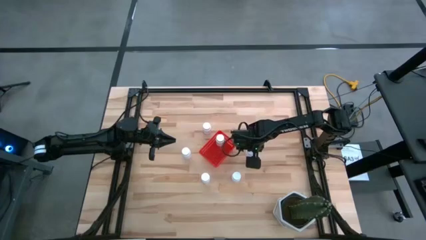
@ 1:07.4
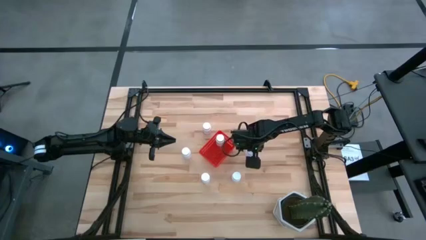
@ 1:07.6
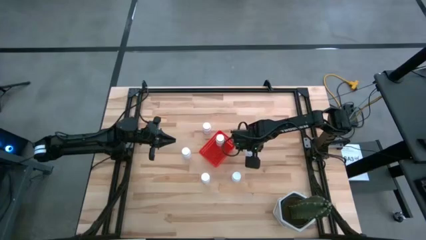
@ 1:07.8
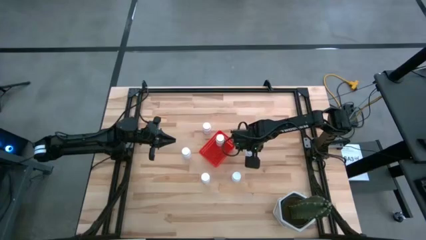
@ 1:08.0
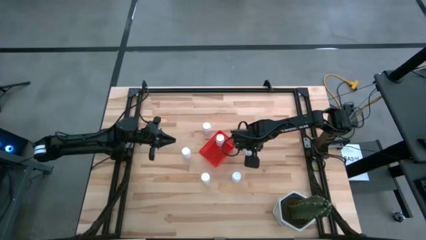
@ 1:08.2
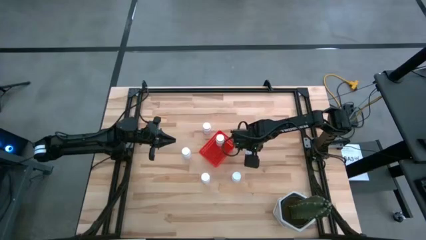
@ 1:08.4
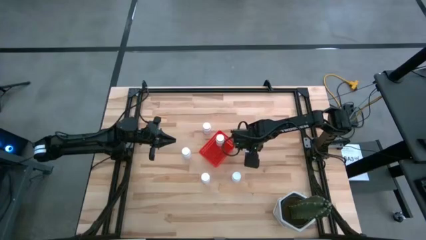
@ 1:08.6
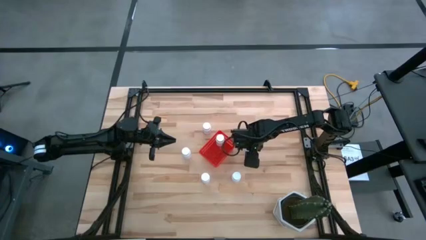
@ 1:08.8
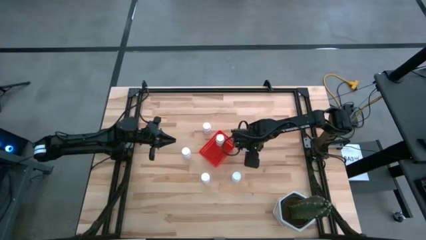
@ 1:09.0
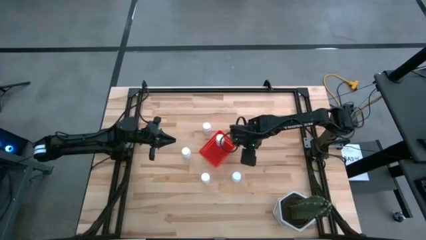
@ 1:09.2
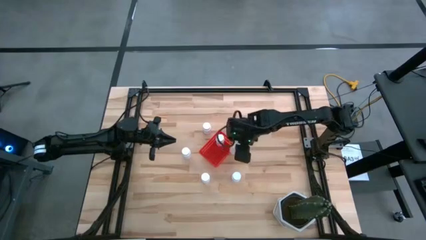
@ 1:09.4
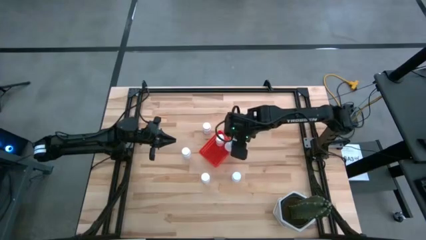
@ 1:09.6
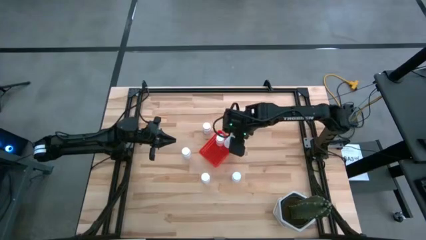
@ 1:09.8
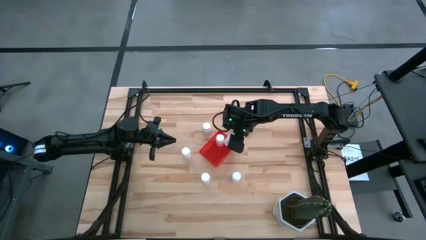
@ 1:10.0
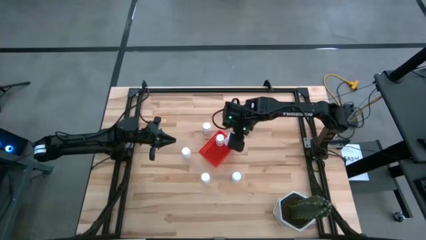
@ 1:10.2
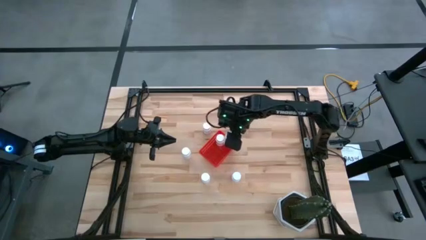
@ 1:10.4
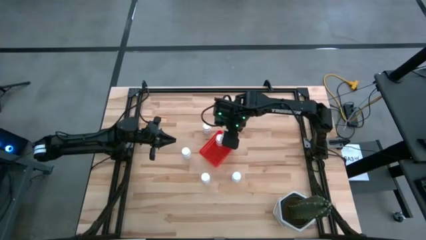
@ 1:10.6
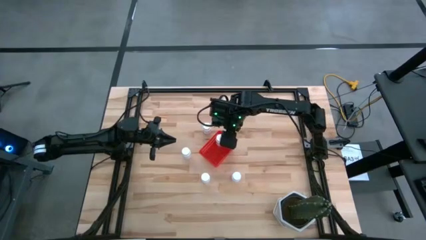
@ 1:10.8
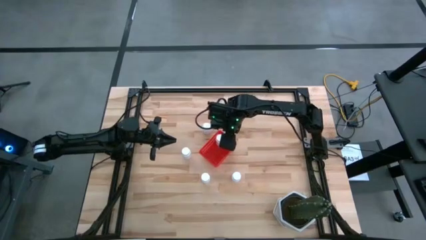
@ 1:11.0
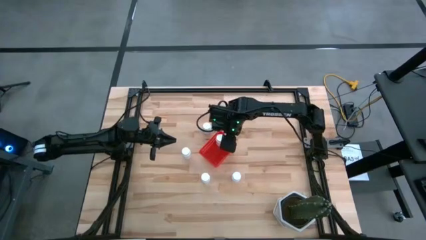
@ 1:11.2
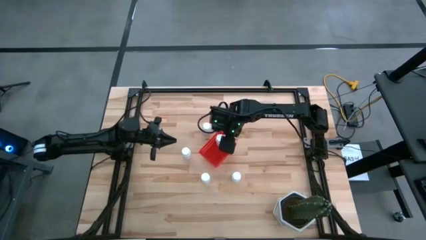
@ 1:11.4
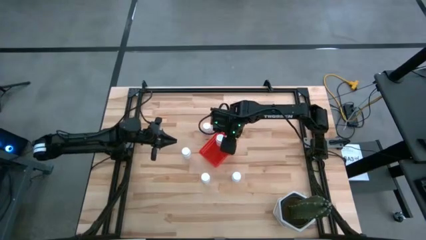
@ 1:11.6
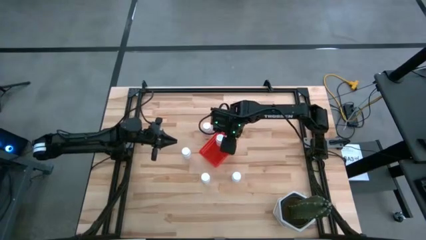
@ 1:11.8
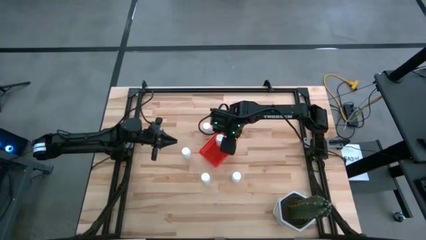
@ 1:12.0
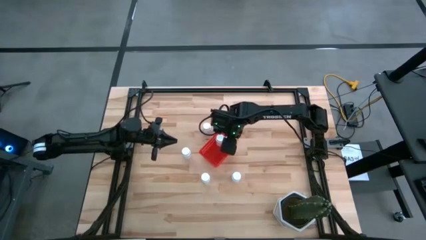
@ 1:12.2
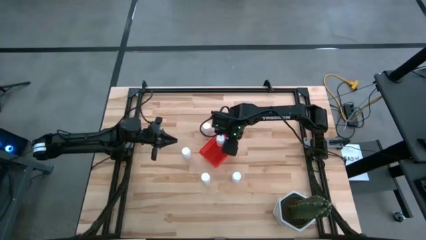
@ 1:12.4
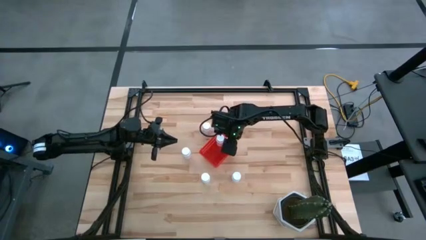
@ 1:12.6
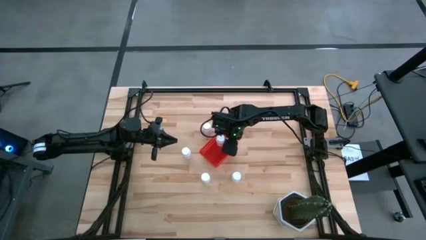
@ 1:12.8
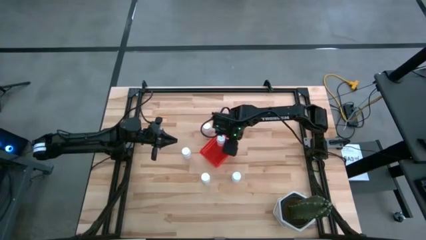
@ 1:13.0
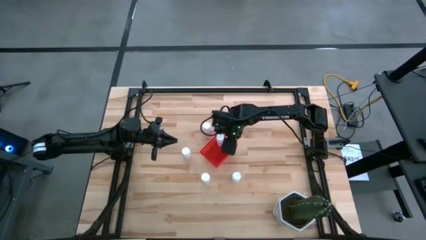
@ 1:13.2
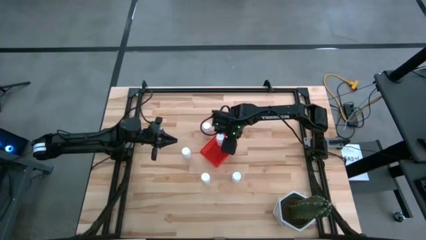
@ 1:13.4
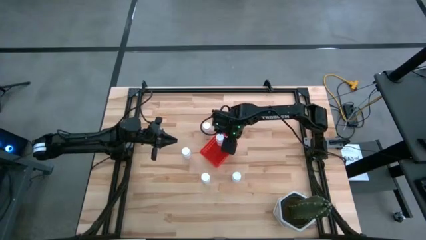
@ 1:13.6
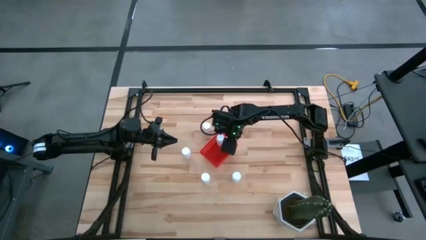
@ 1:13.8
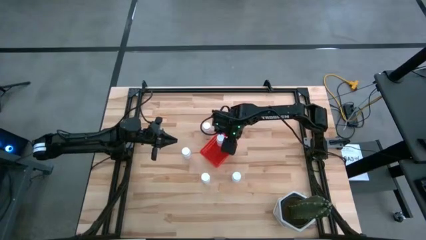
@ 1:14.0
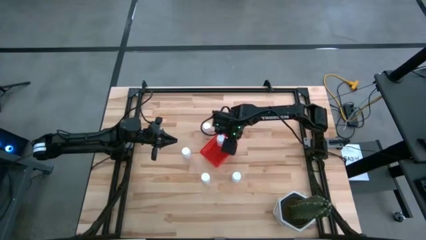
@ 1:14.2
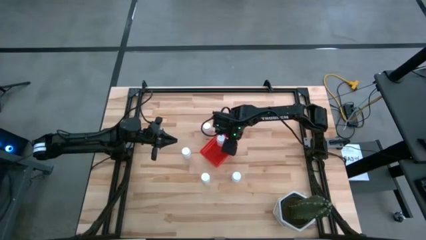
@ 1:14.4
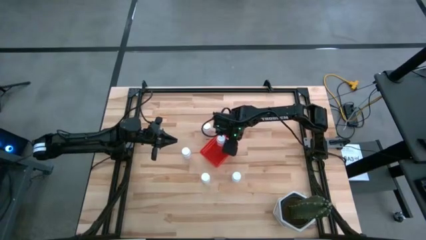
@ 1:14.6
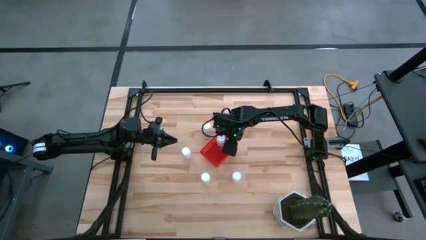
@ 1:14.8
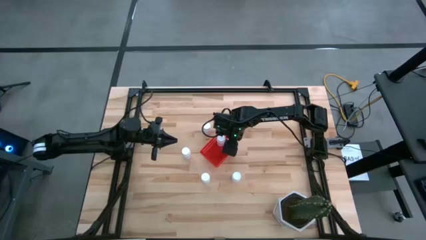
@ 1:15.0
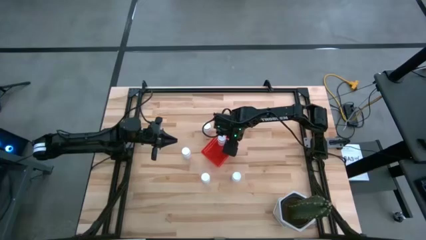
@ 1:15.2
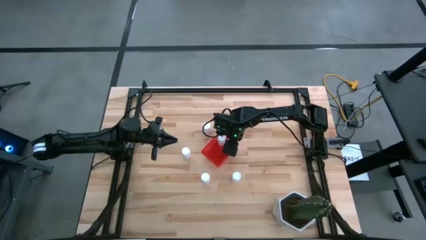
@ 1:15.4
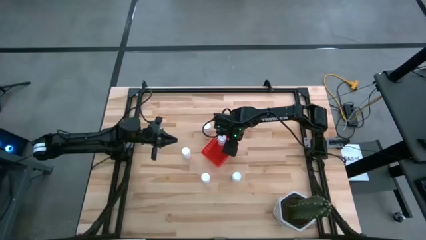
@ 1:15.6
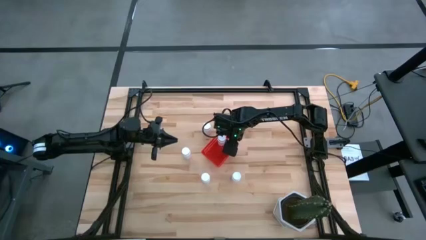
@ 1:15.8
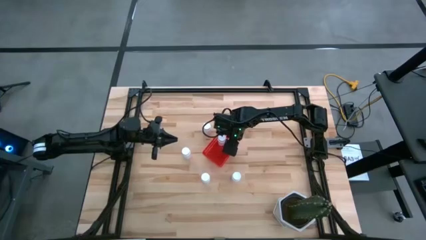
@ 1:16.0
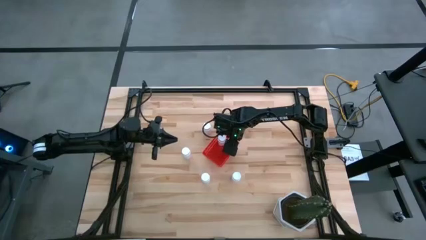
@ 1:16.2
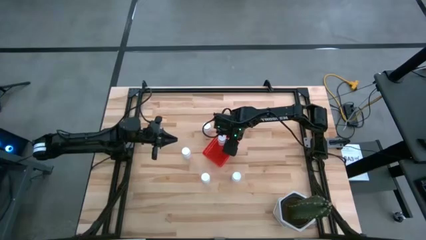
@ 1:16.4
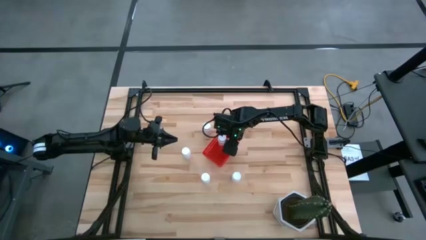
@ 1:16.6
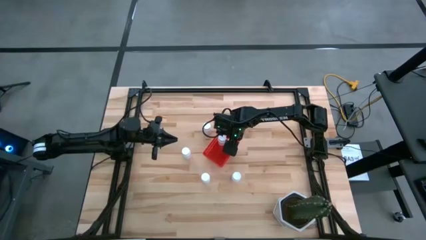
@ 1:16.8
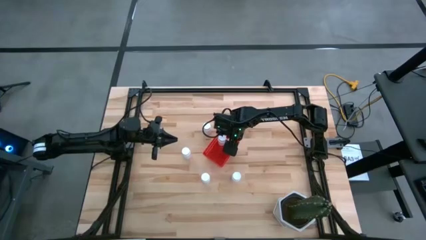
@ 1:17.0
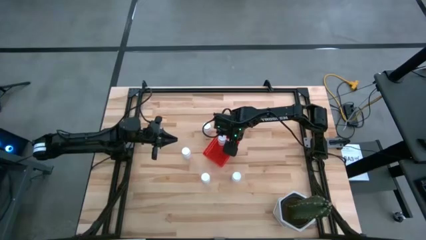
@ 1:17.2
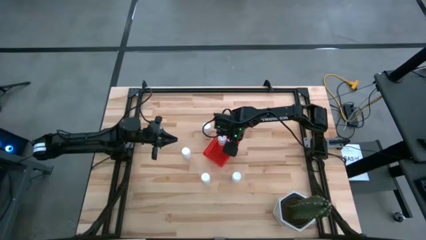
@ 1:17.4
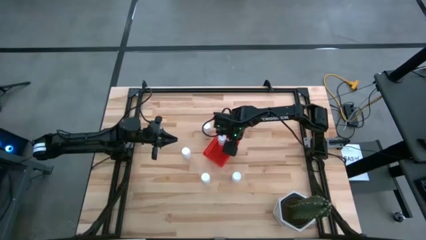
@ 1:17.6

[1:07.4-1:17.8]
Task: Pick and place pill bottles into a basket
Put the white pill bottle into the red basket
